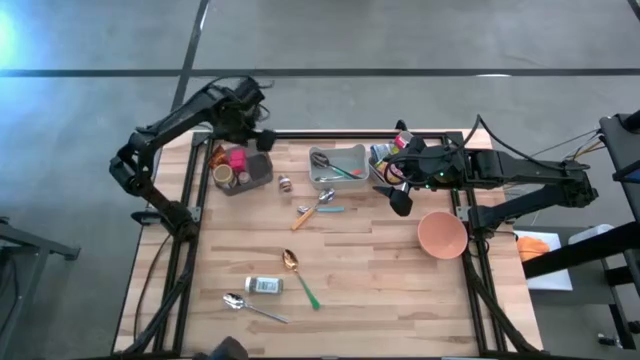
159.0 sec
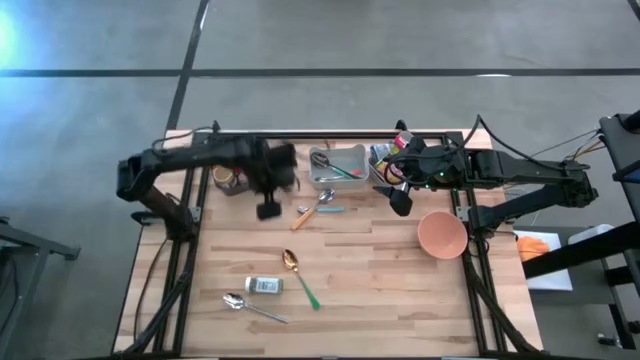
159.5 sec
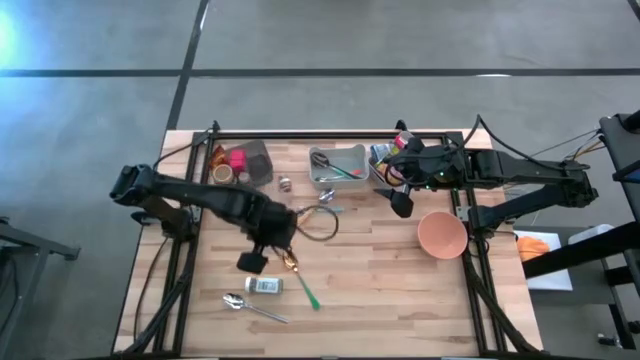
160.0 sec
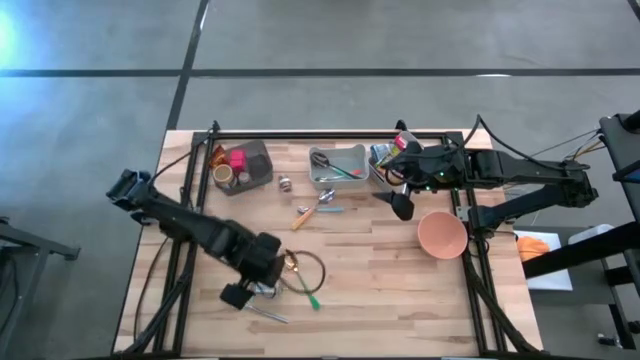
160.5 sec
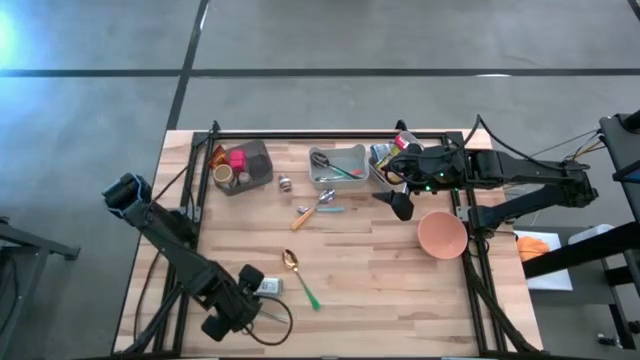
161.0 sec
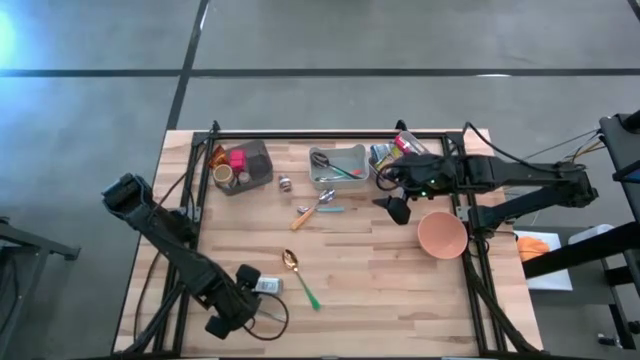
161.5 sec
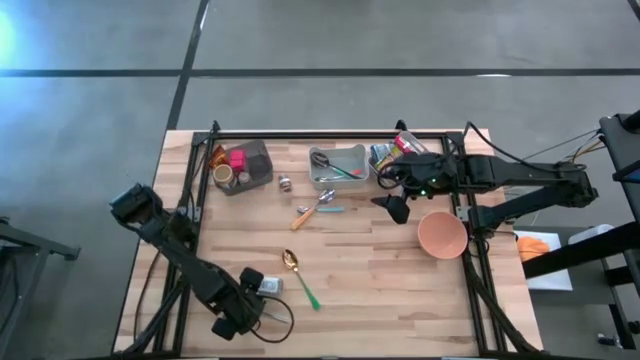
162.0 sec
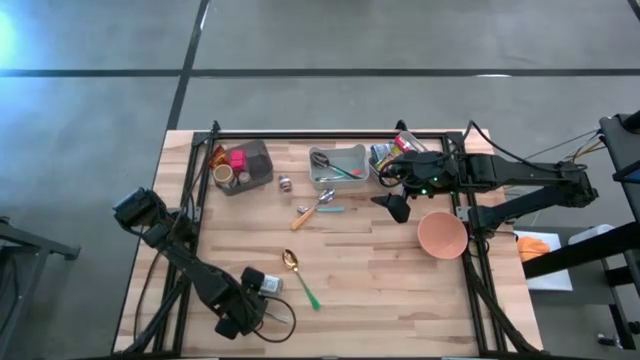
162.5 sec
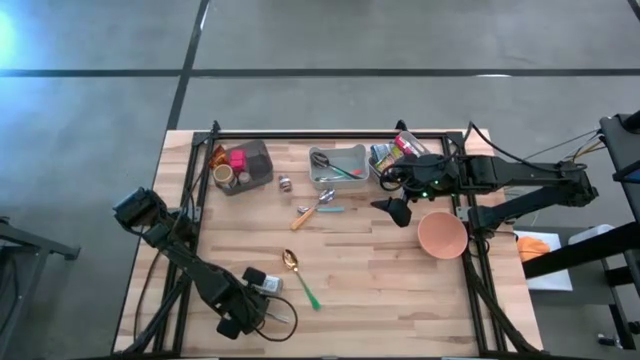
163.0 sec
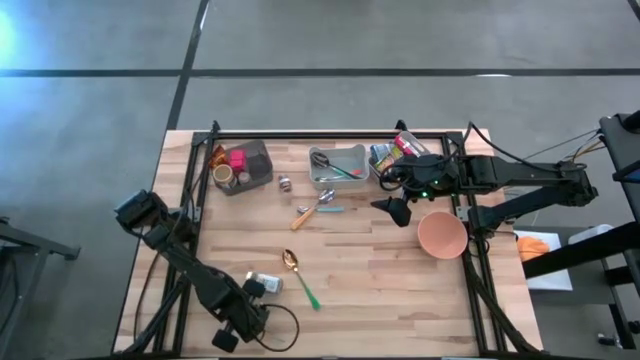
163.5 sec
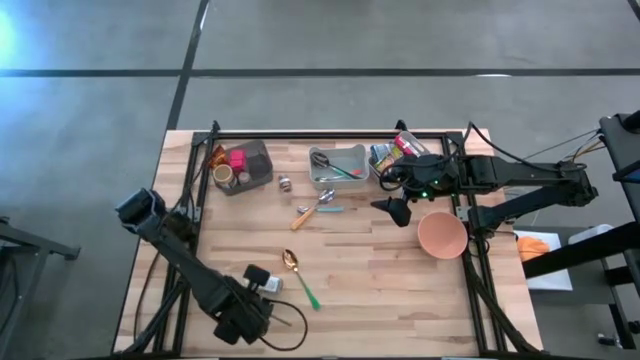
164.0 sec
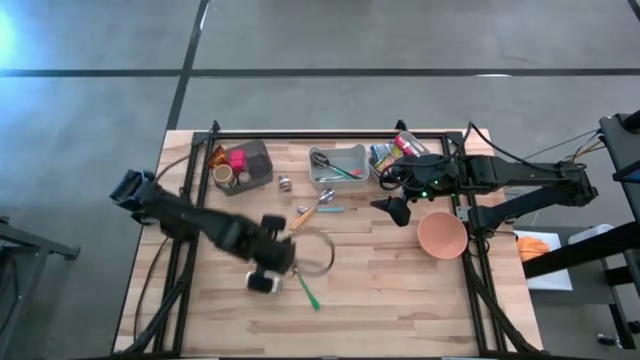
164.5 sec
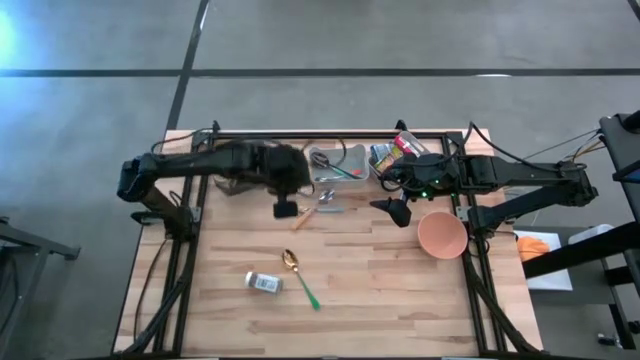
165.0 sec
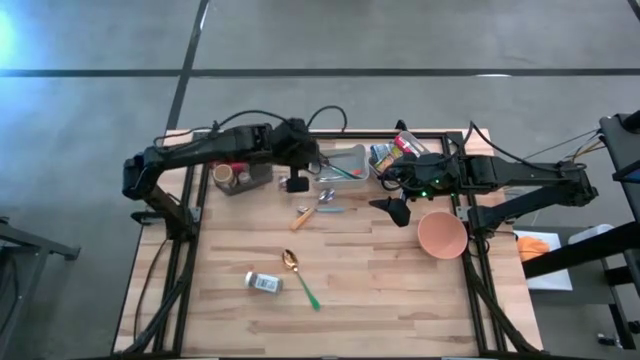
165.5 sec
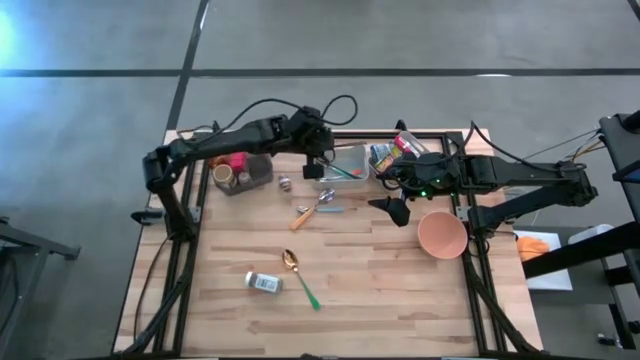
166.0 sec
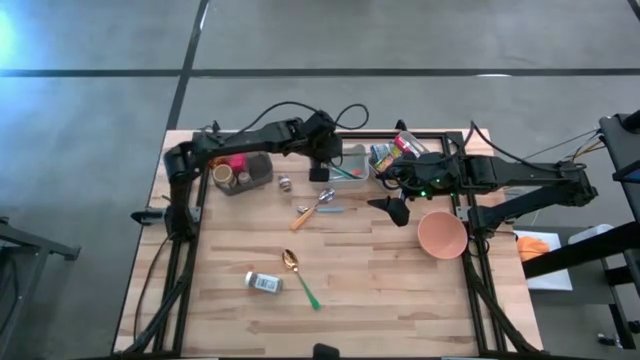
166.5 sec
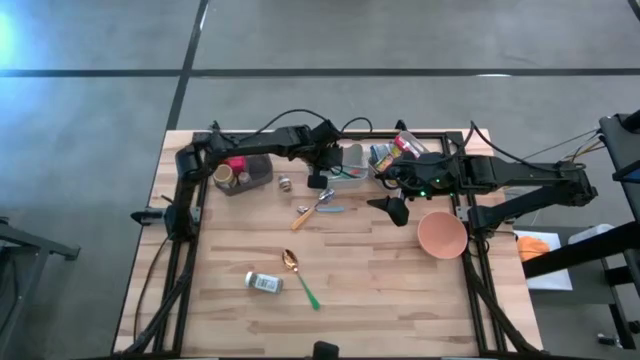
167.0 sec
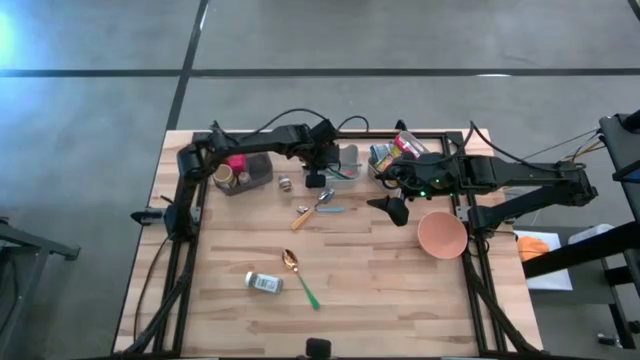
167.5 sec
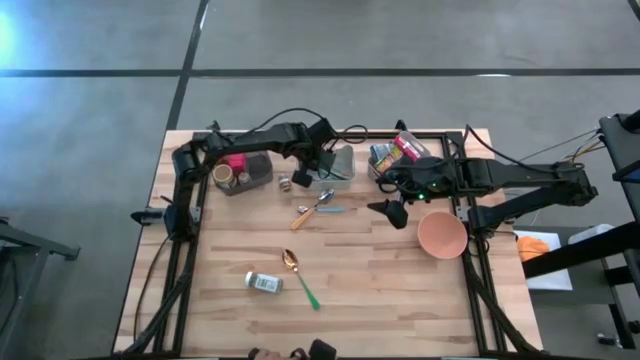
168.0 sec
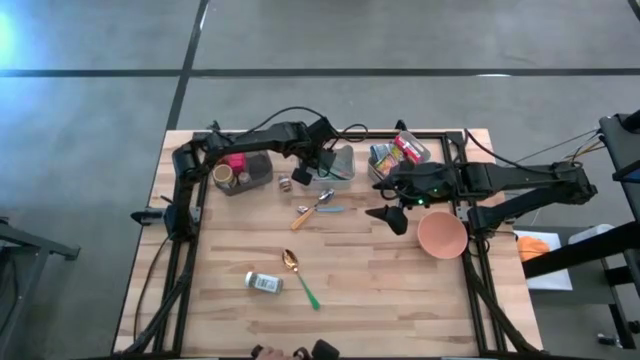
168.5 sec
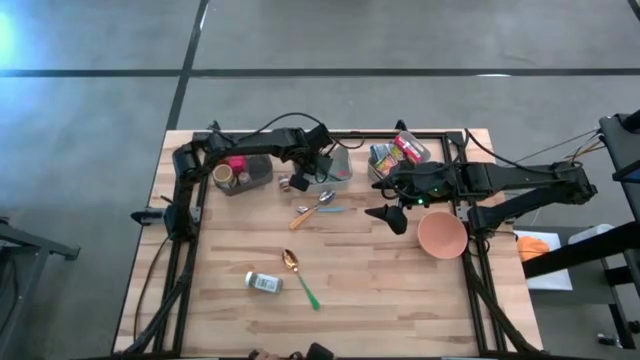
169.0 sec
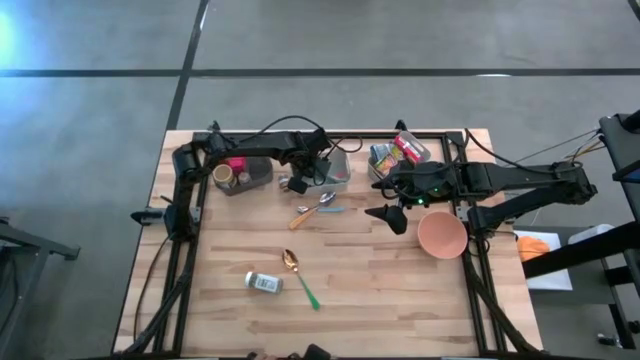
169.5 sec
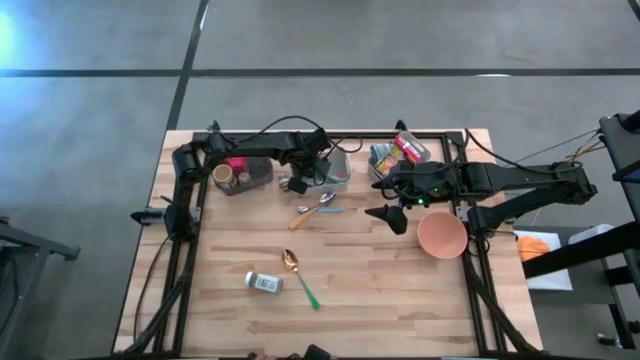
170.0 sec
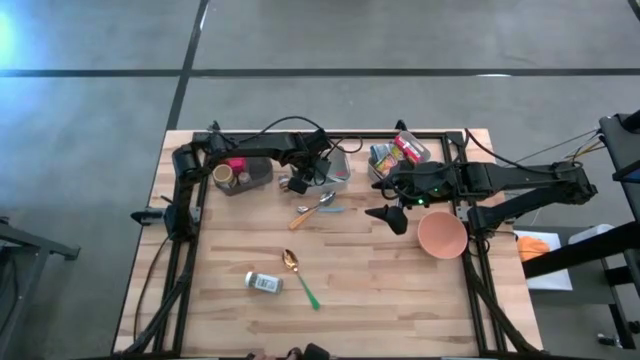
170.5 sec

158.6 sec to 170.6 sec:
Put the white spoon into the left gray bin
